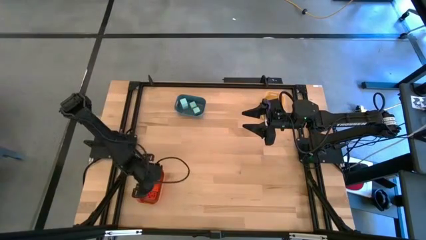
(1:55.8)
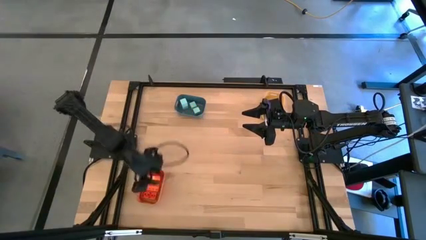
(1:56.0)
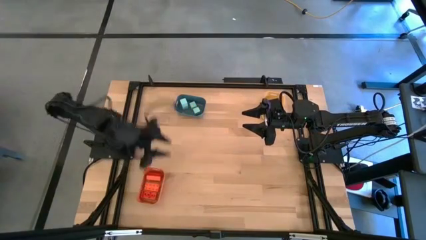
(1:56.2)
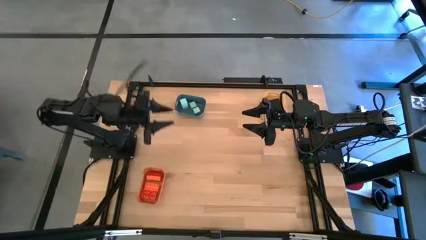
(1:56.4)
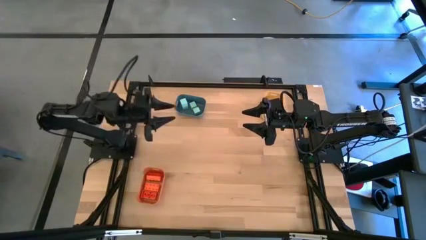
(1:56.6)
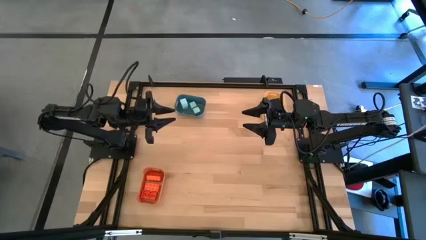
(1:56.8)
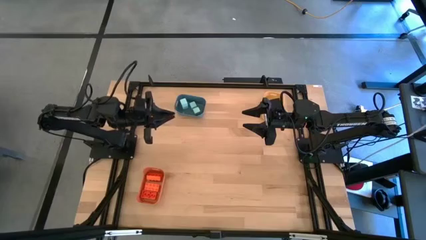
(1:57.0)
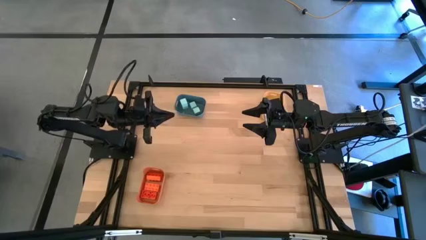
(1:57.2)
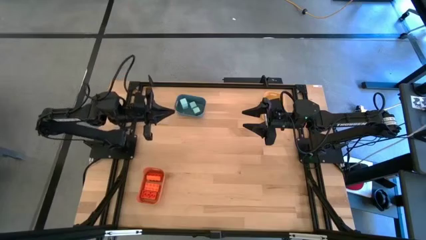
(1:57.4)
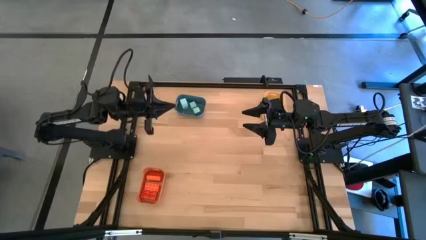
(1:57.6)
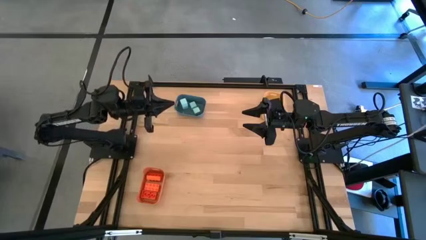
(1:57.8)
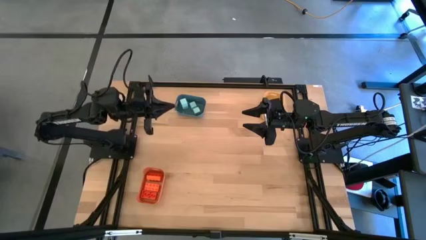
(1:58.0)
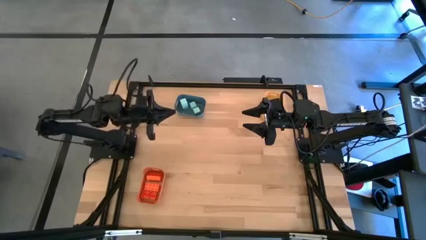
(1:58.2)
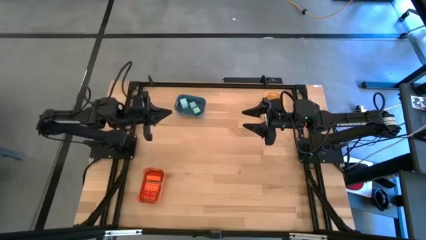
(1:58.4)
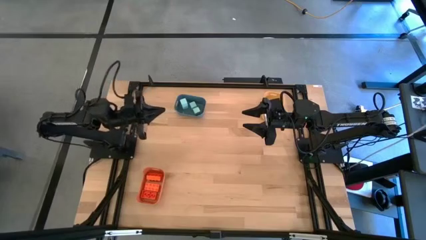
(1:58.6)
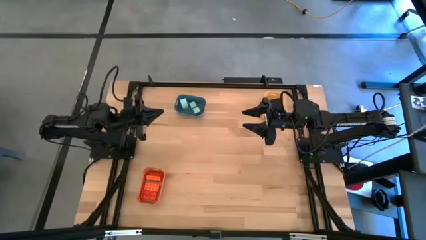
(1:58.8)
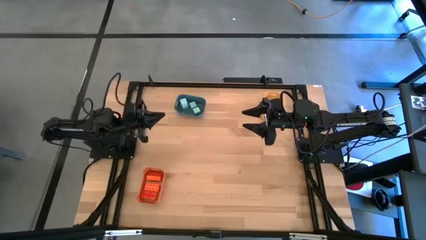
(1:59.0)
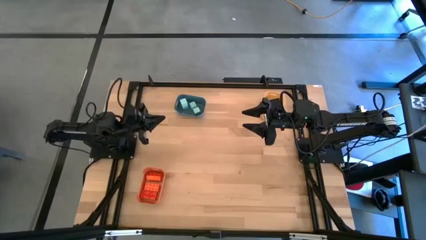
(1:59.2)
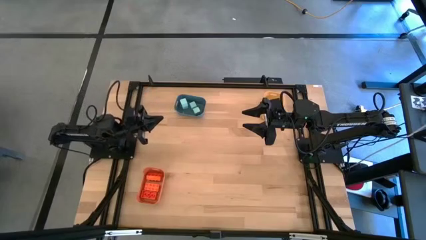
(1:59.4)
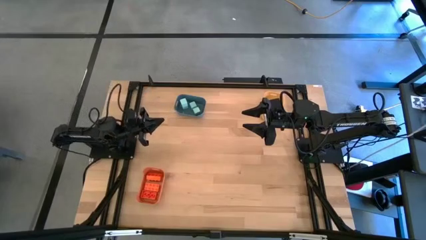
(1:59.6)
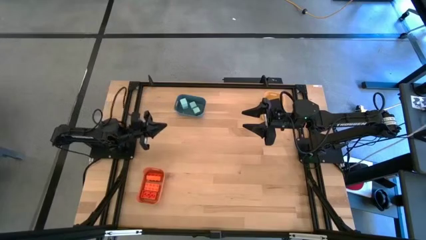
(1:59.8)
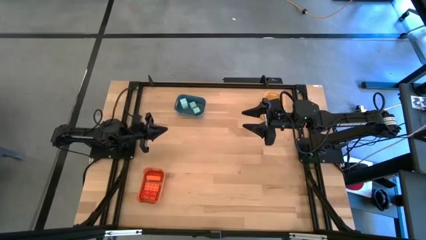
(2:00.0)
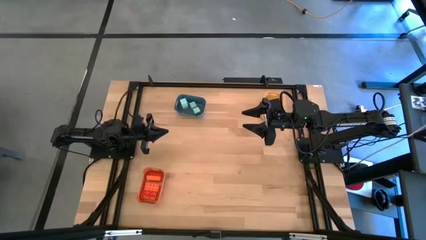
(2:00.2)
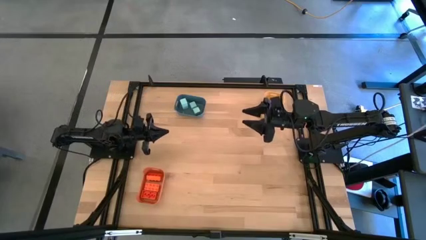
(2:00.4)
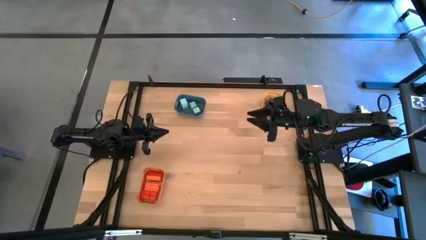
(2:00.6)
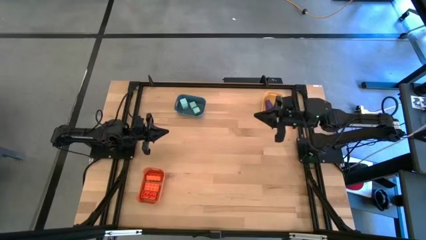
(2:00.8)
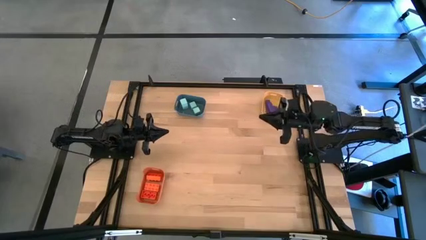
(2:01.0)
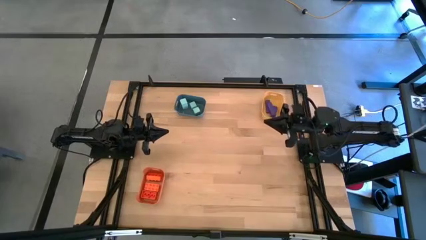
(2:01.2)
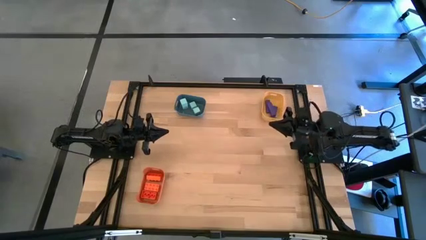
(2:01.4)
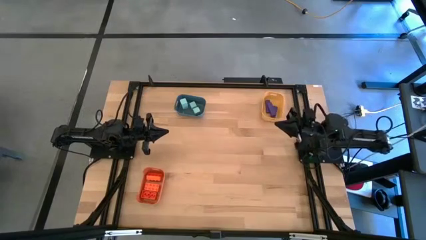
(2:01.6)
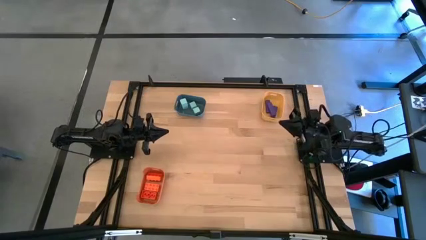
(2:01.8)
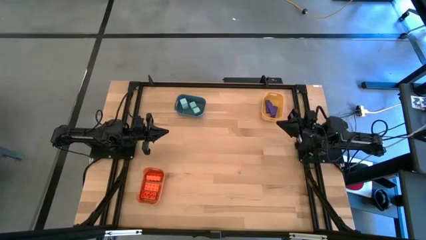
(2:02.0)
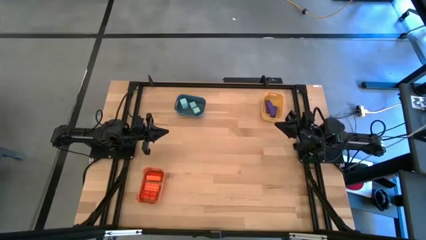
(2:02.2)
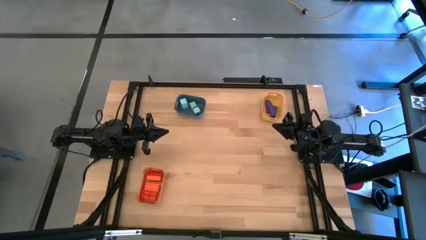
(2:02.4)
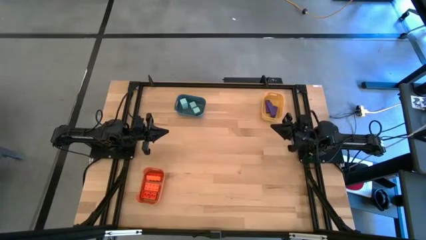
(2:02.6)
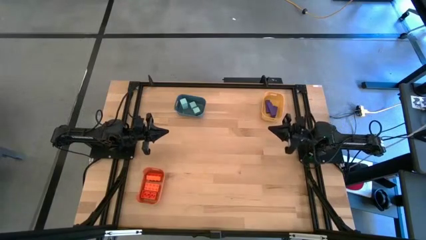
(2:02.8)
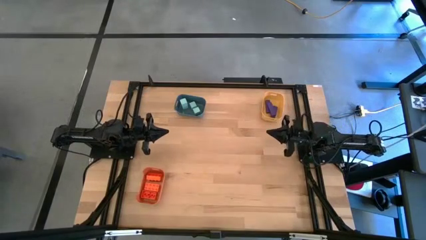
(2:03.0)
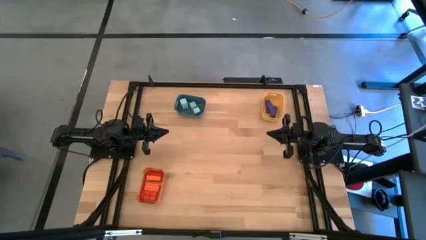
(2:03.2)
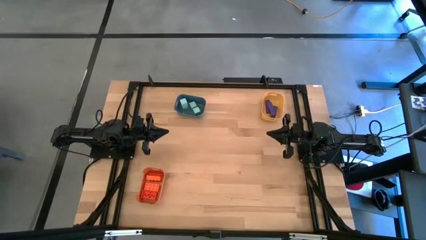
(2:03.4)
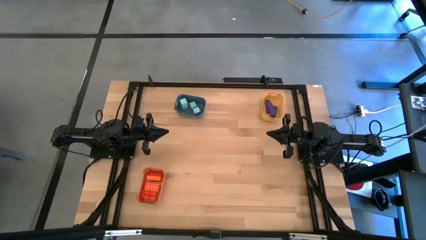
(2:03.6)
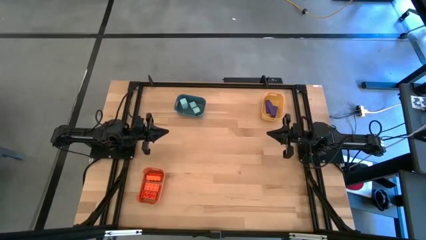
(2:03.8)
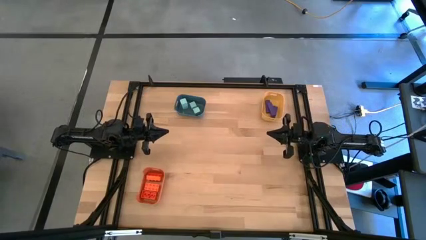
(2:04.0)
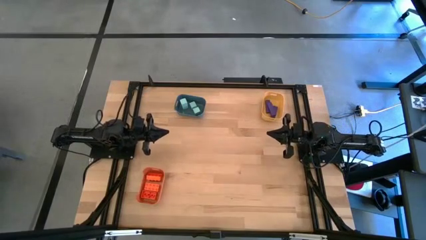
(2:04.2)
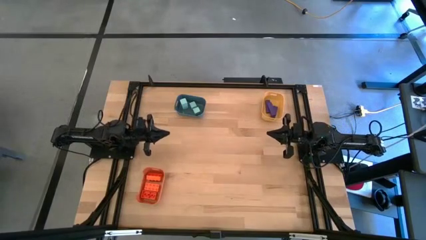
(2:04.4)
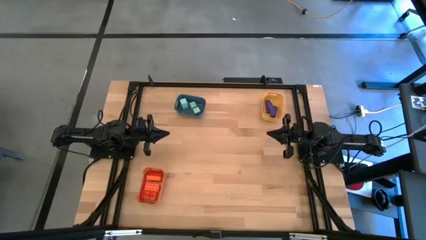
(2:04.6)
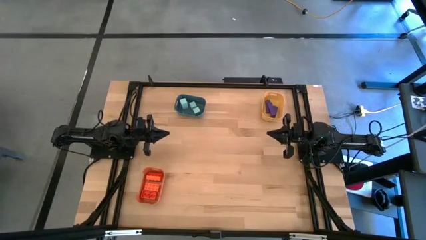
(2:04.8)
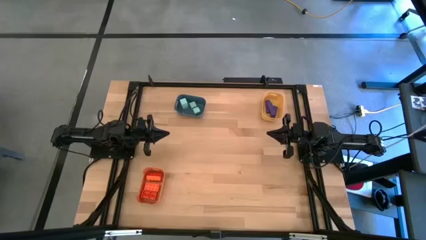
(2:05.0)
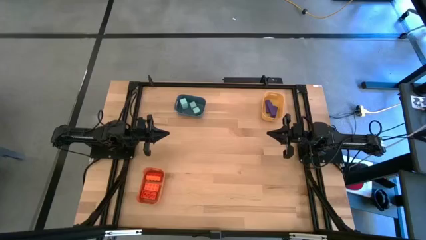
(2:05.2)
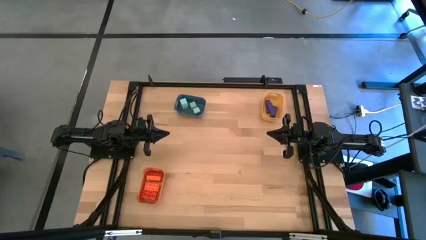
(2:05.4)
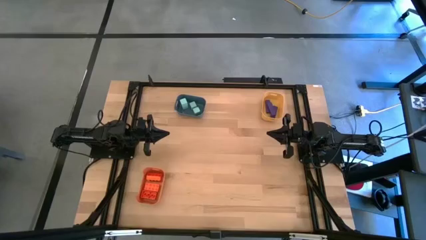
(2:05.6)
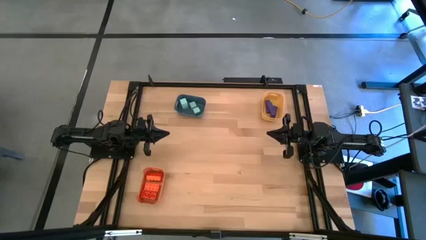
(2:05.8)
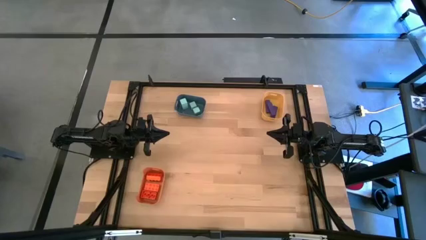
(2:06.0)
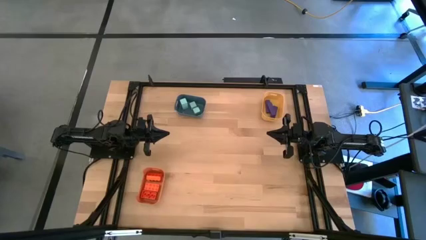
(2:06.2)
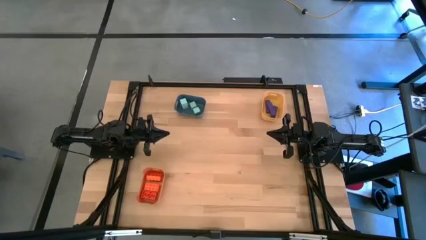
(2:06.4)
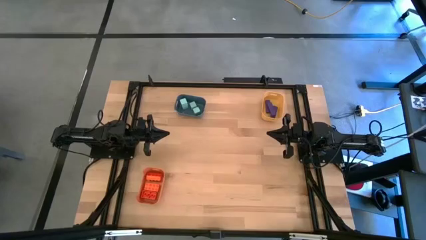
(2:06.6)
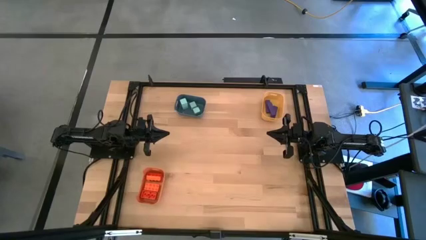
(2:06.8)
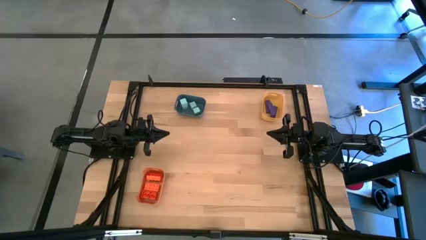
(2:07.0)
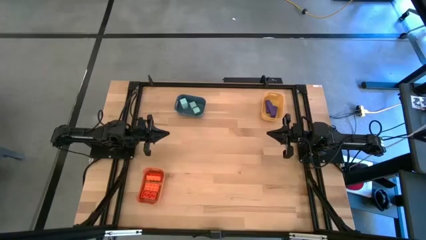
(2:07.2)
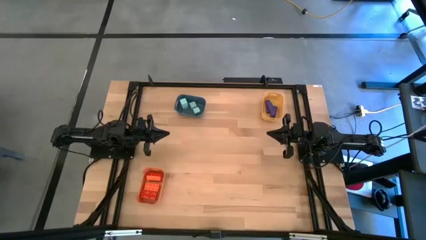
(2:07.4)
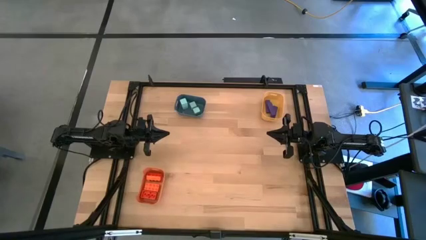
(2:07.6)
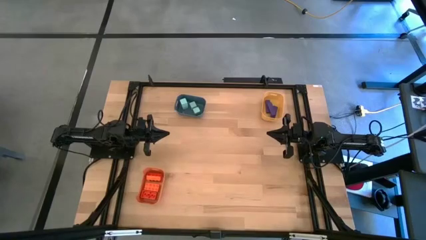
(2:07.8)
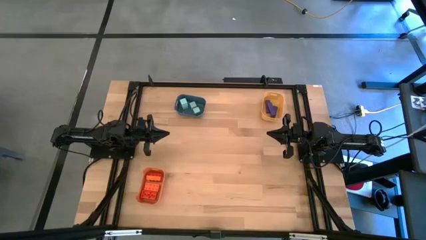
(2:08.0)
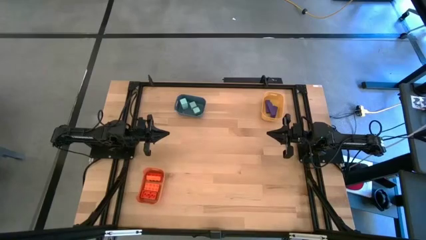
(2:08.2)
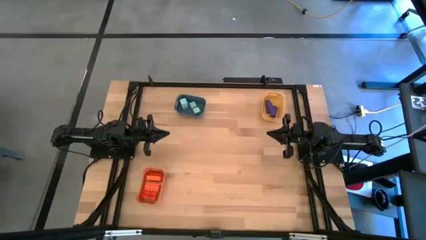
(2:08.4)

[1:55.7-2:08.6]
Task: Sort & place blocks by color
Return to Home Position

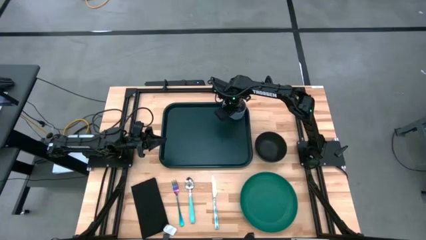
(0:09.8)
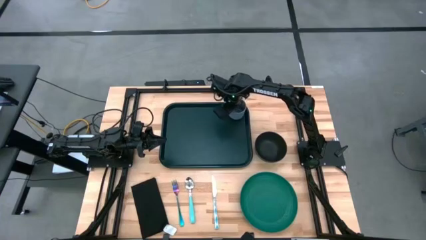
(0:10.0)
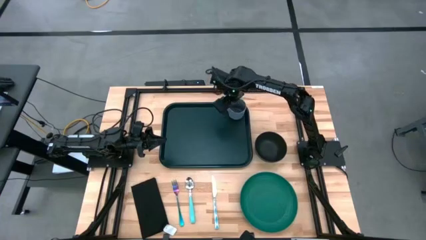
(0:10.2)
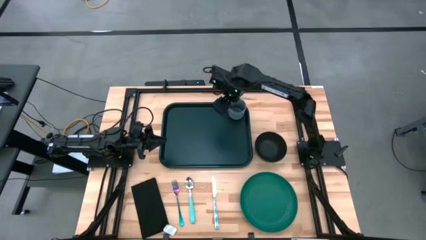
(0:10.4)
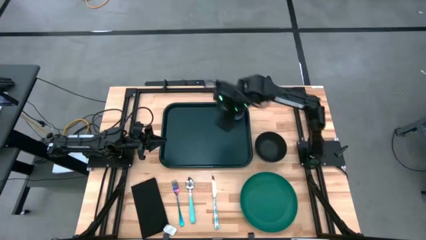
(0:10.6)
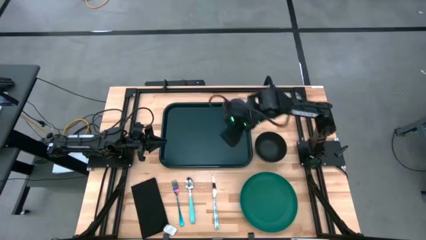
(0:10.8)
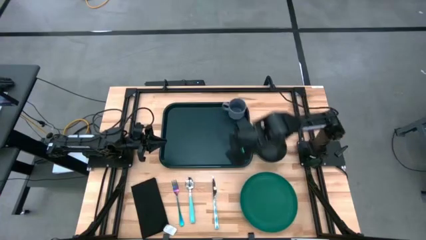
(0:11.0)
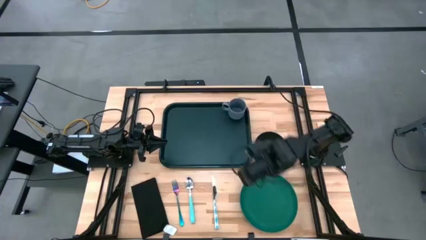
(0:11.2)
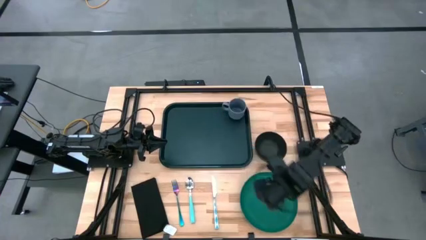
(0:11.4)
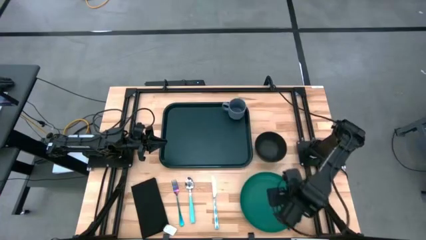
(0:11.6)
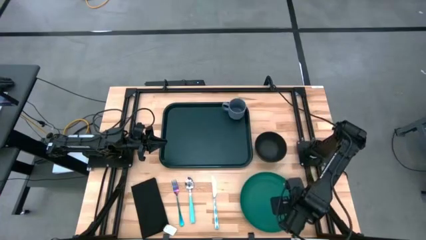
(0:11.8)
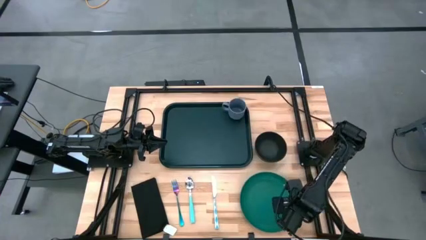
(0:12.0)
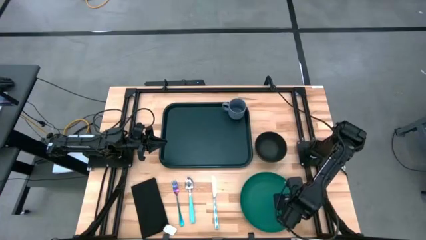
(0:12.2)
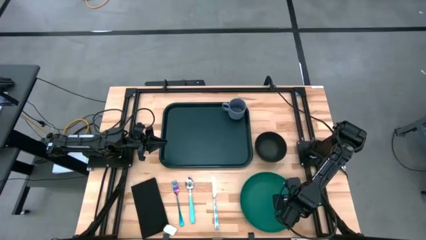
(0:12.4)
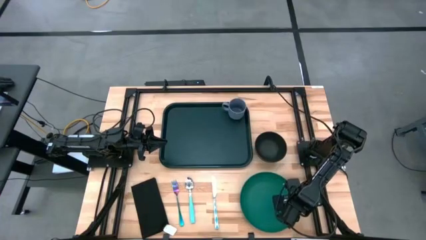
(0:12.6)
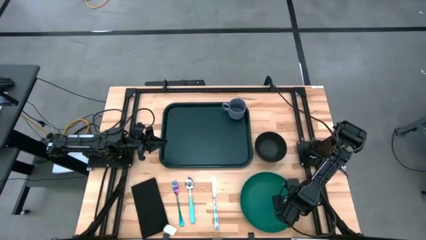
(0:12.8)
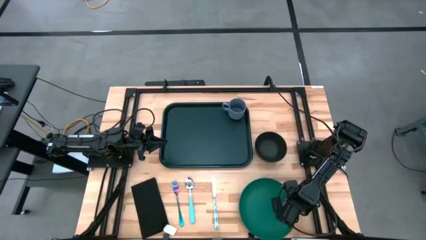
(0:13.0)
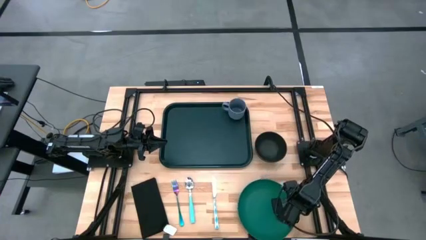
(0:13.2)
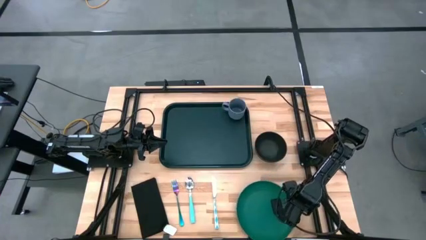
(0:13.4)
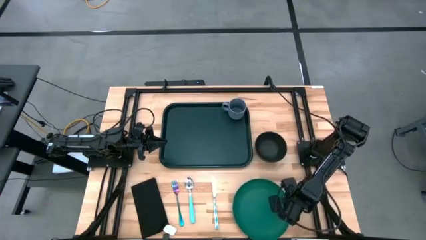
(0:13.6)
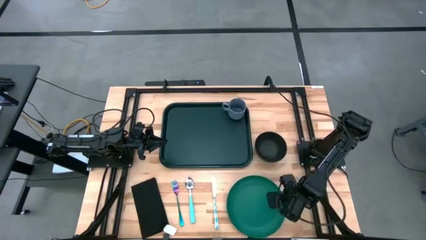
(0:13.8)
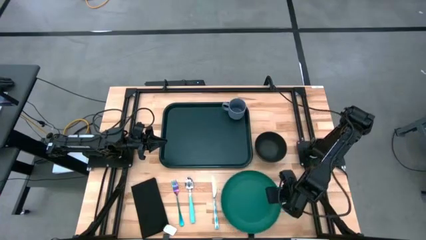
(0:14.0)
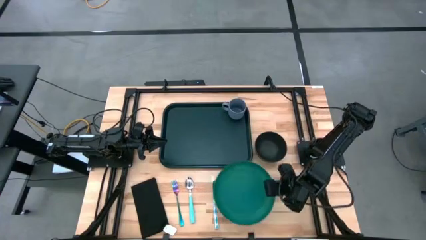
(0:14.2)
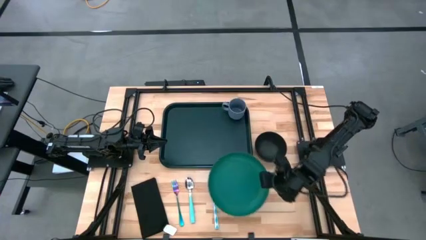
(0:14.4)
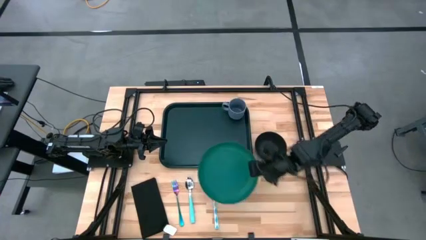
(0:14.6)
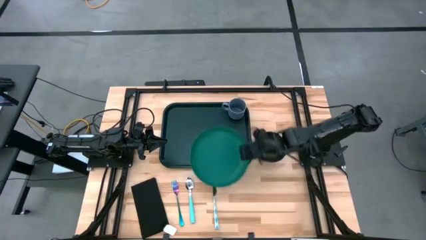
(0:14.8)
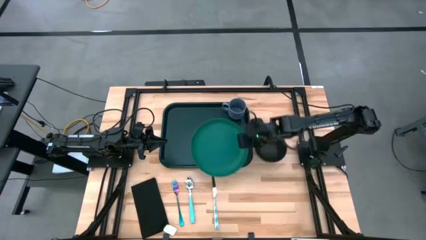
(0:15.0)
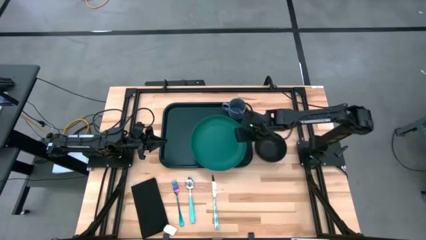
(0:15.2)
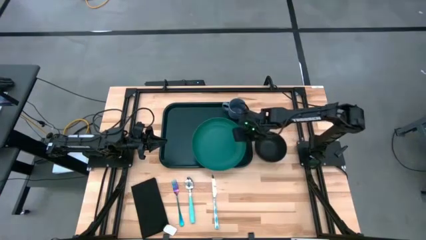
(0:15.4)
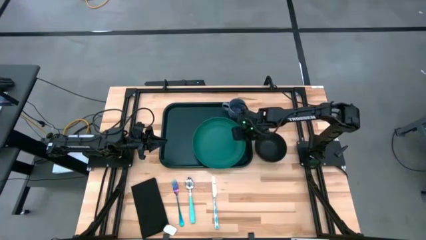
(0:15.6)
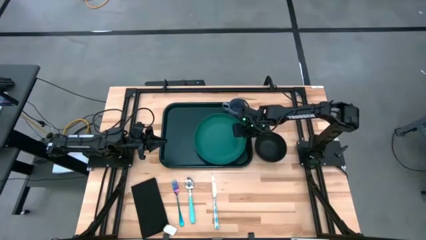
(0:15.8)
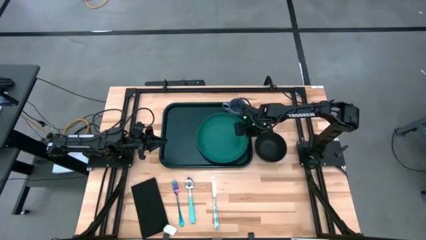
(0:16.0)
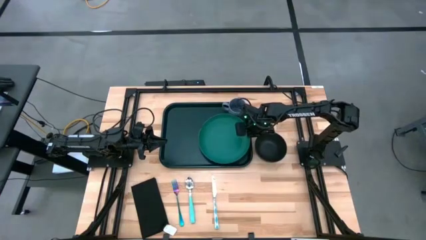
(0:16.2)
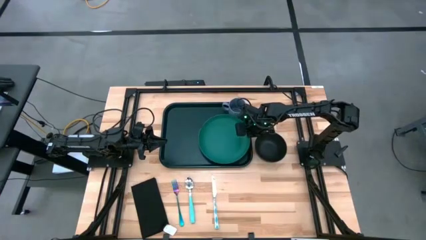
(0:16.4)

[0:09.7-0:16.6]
Task: Set up tray
Put the green plate on the black tray to the bottom of the gray mug
